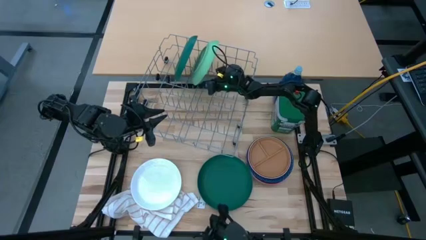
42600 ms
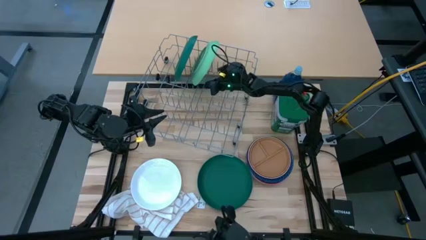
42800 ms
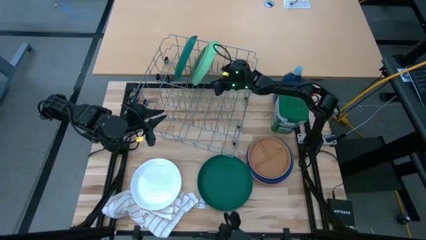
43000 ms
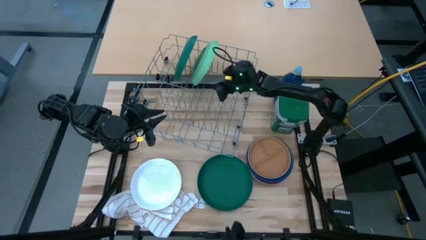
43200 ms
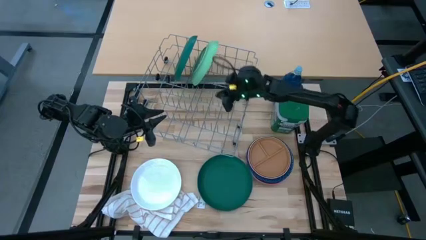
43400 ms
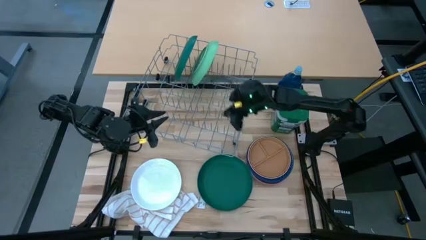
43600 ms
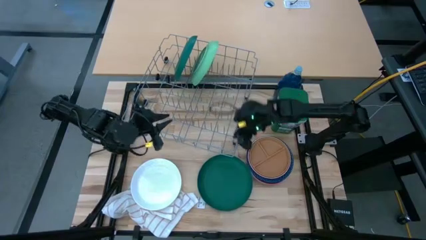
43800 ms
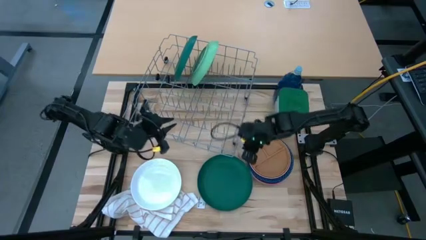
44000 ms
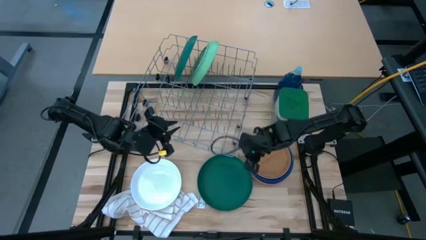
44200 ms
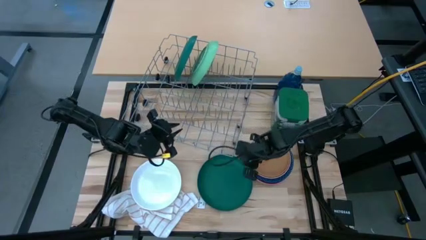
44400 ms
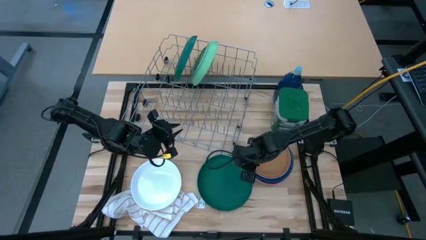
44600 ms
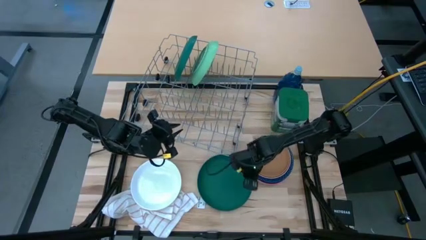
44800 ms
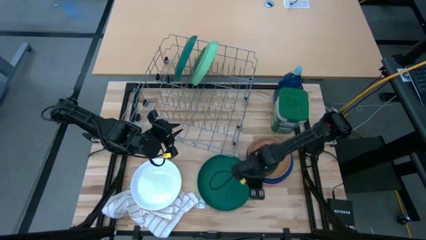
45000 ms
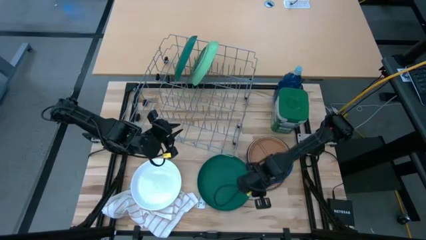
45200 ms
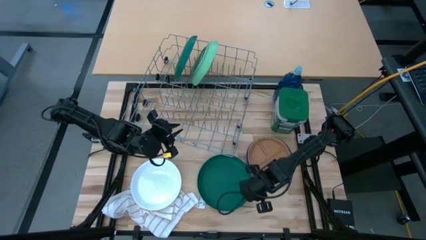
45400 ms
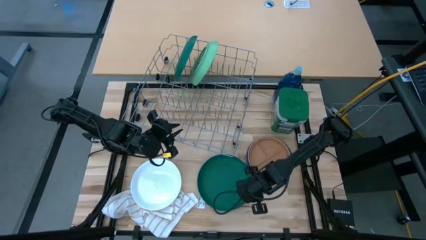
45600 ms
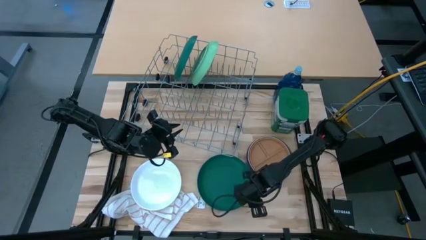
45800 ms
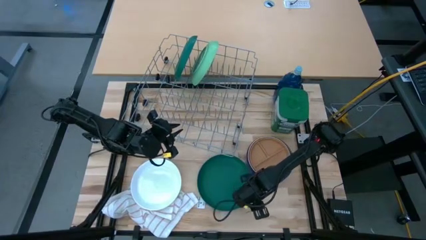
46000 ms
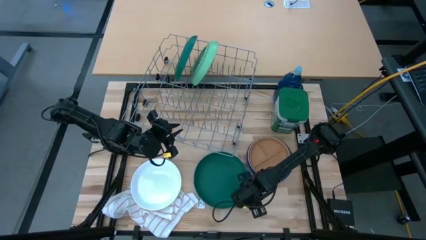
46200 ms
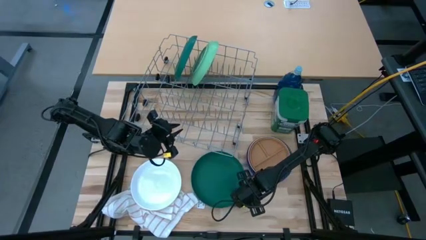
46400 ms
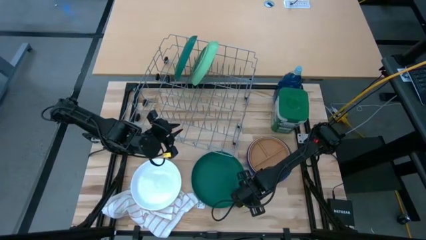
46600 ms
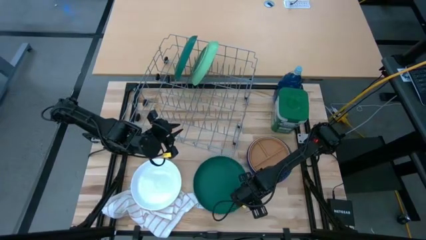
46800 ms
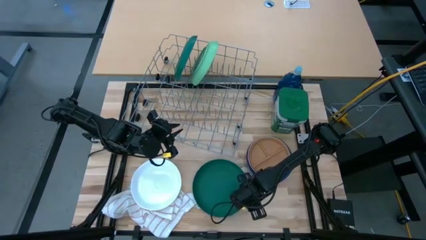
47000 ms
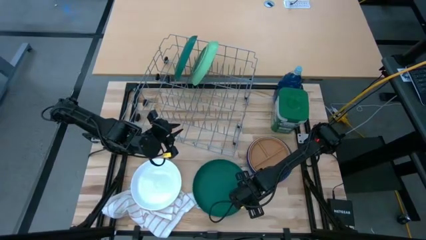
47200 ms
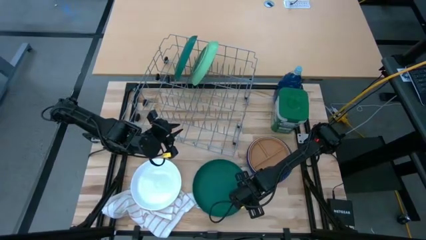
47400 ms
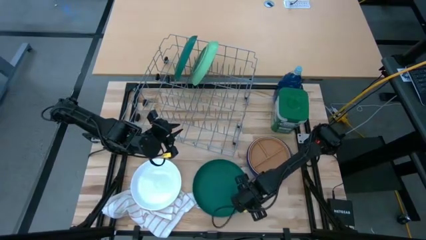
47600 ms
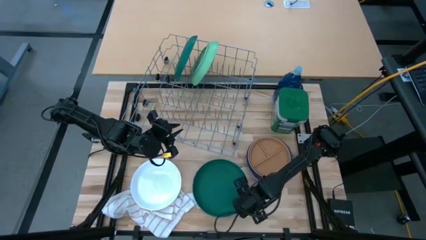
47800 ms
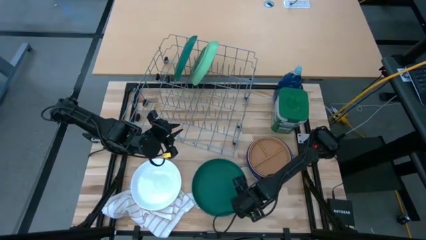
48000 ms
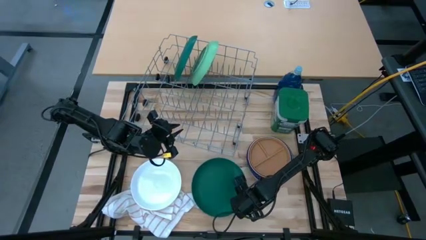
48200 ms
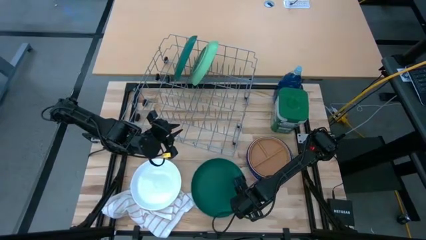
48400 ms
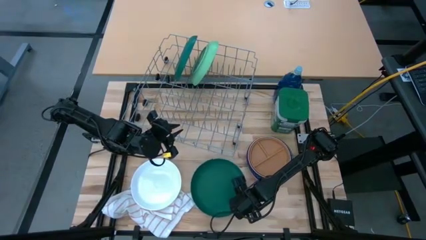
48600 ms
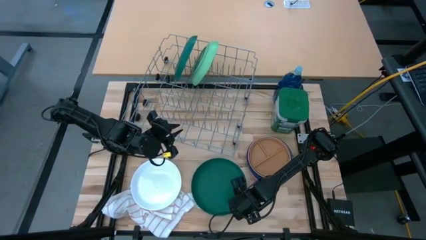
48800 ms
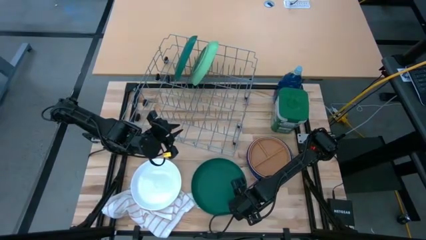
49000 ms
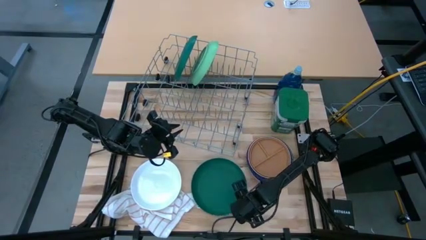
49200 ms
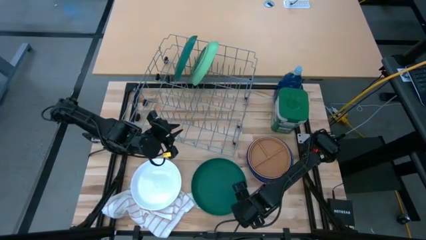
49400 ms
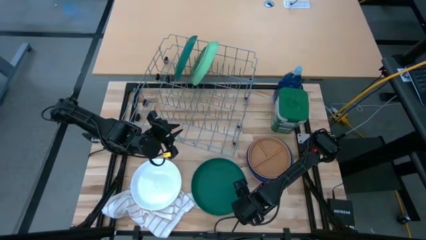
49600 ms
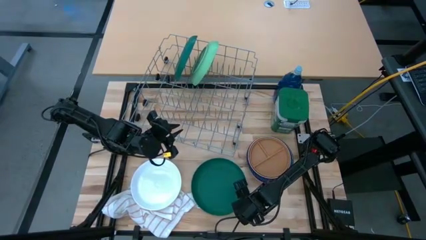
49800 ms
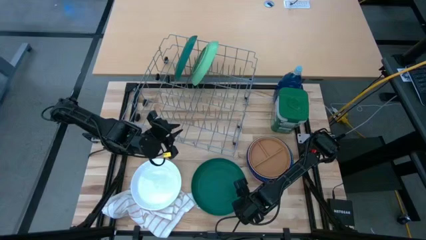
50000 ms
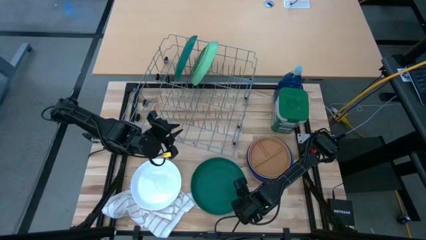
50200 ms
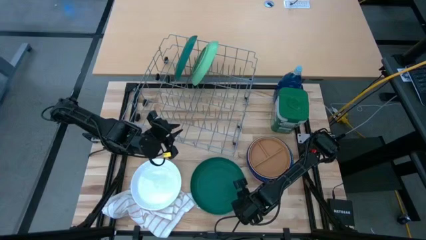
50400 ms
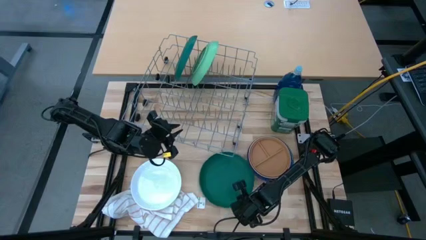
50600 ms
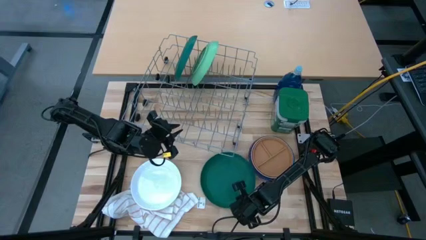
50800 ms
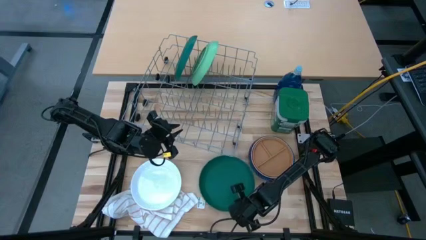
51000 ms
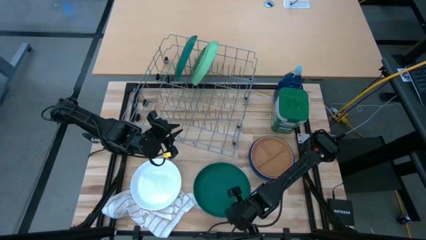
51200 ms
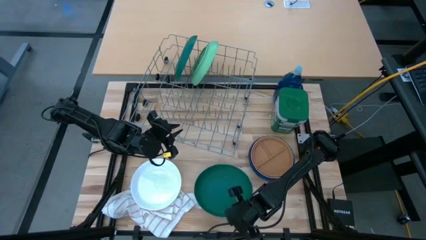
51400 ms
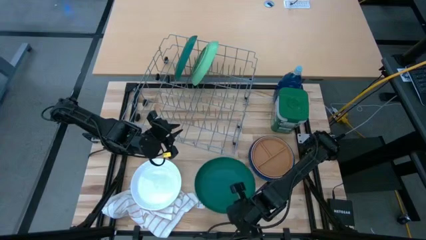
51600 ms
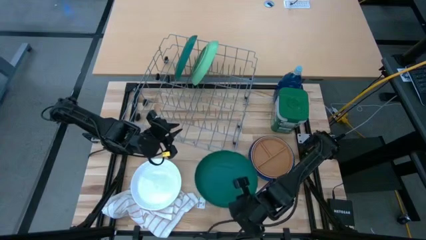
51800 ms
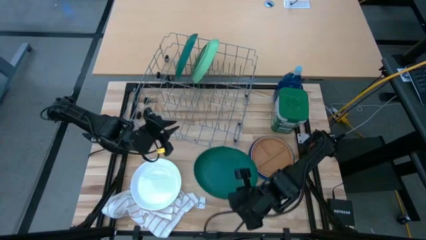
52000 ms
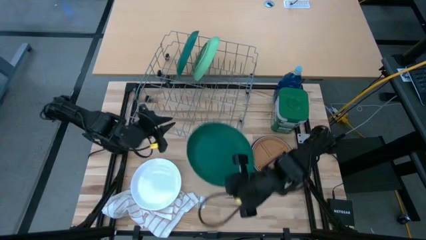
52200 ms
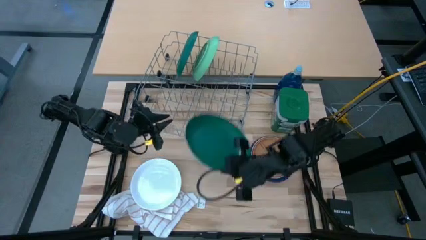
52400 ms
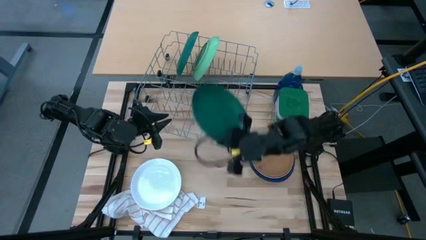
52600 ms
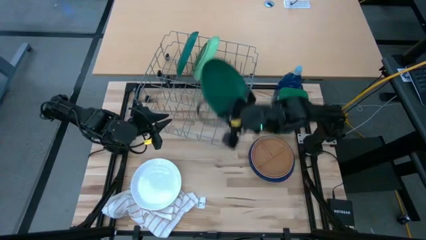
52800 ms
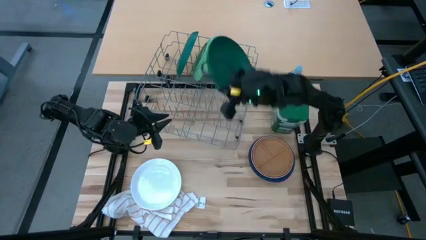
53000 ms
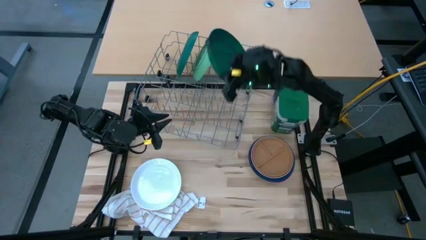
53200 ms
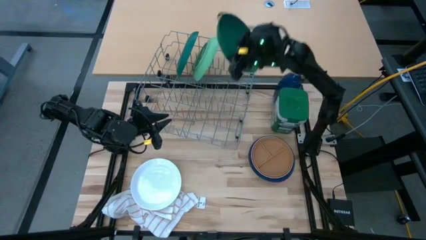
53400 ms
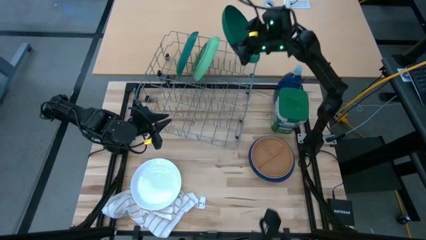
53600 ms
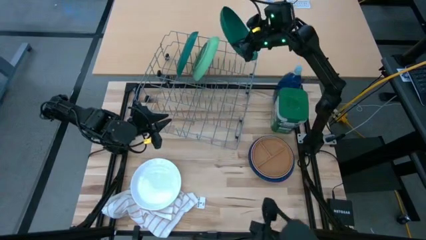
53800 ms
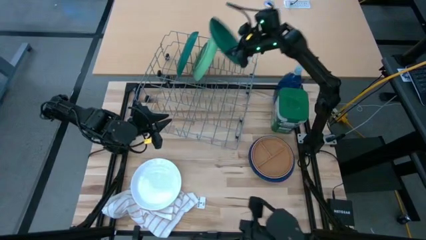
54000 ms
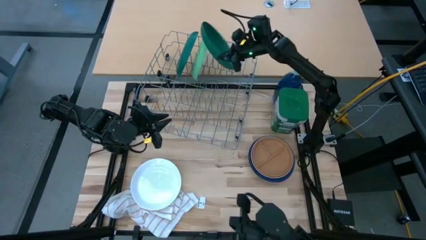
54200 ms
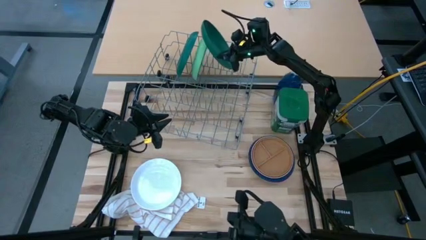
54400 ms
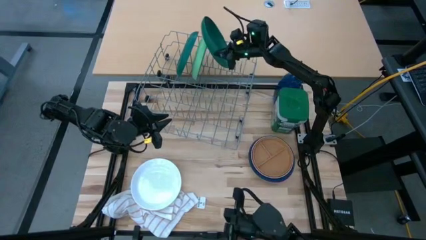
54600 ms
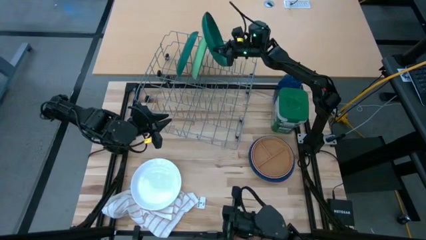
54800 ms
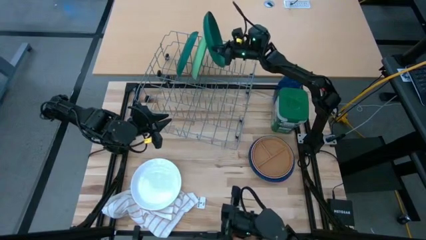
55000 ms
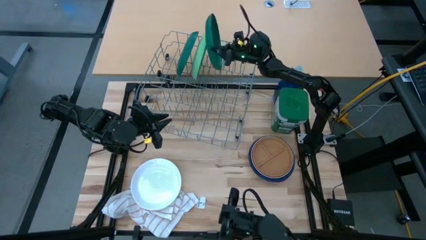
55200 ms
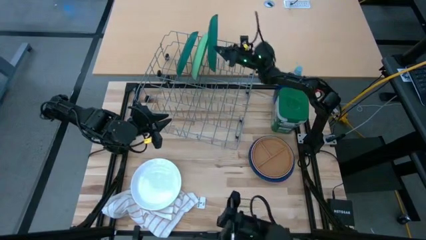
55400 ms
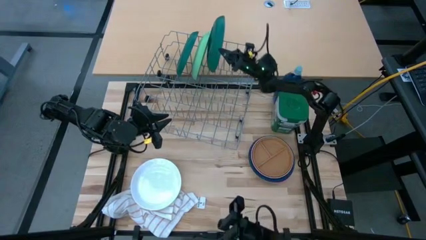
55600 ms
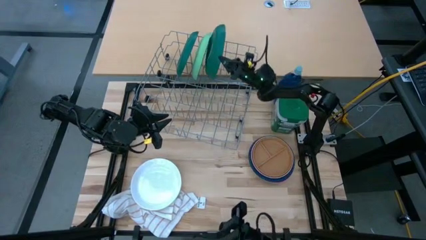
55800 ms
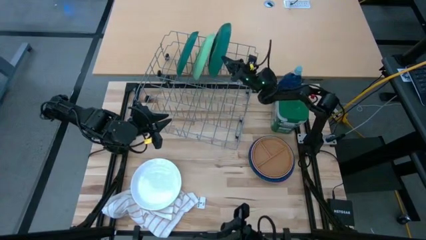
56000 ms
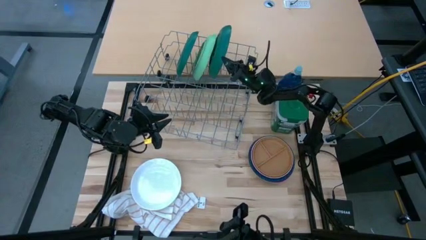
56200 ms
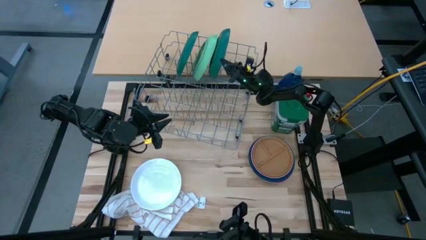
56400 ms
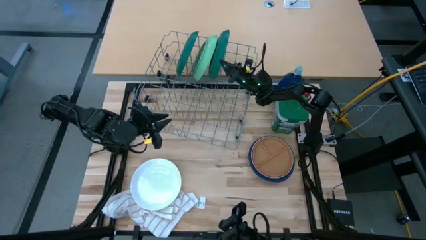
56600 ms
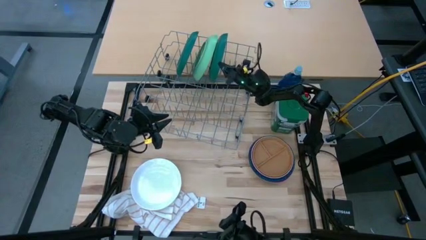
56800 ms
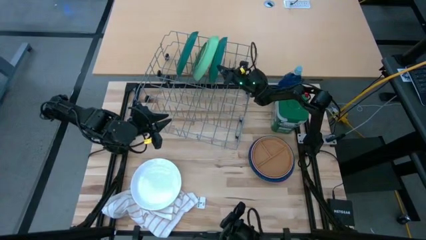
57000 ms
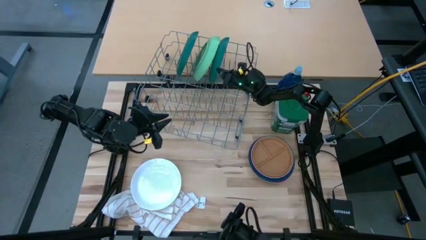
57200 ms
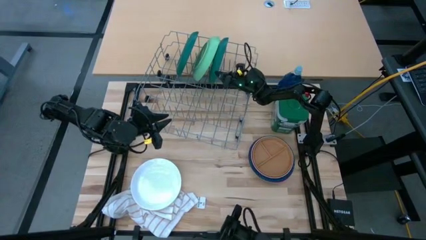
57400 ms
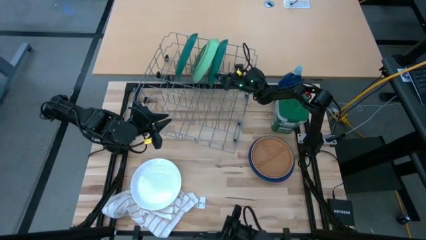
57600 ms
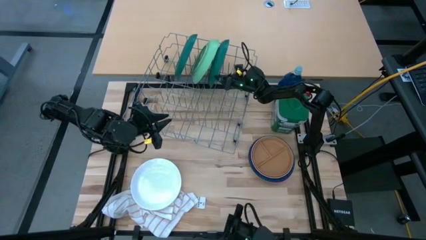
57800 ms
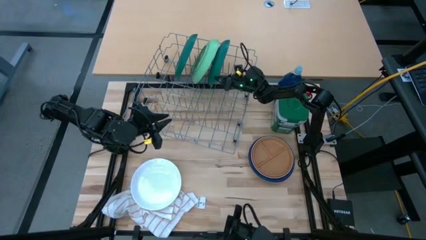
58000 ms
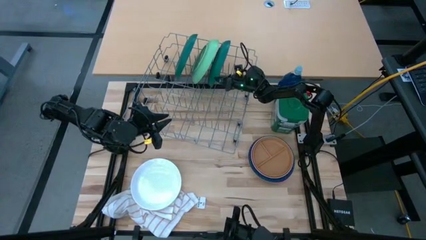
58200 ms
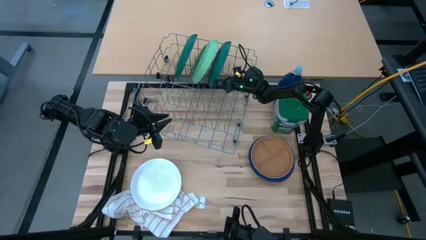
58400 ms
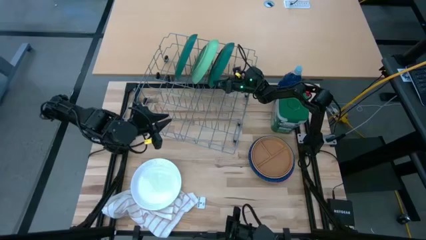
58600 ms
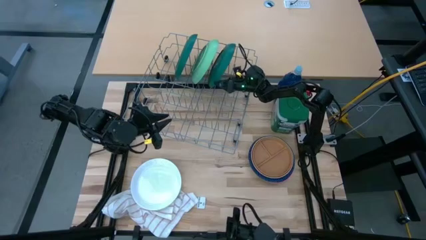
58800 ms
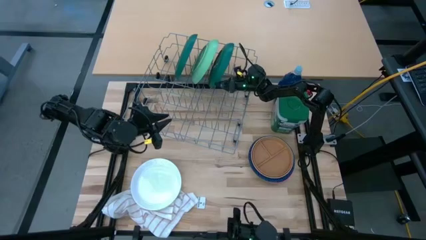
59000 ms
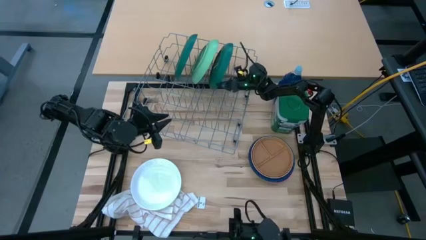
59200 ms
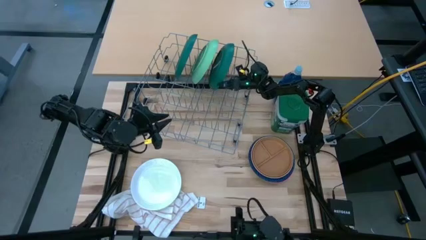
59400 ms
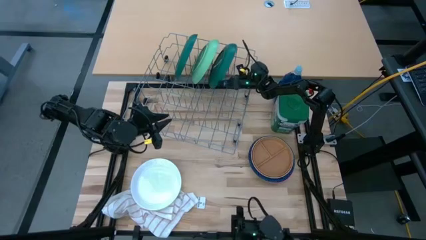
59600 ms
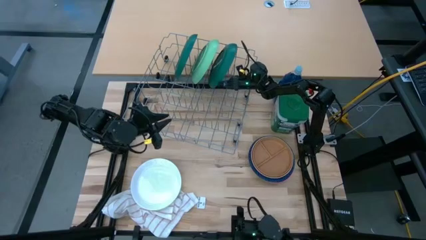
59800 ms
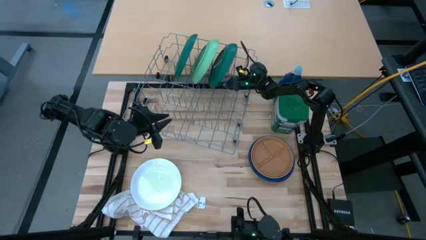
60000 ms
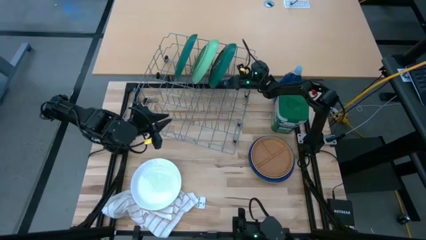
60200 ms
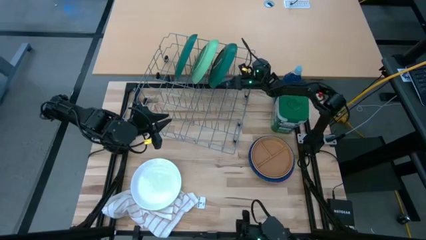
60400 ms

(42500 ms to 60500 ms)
Task: Sort dishes
Put the dark green plate in the dish rack
